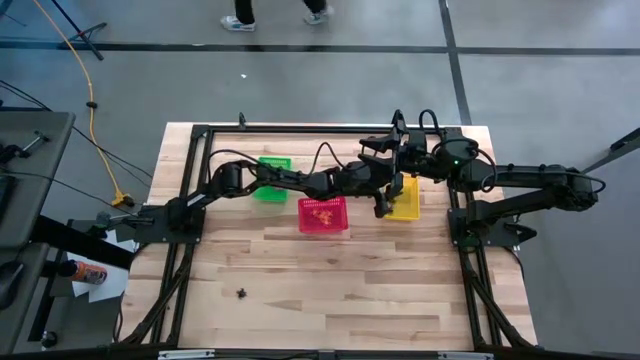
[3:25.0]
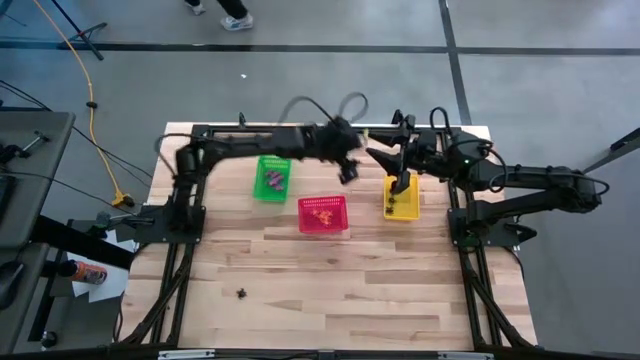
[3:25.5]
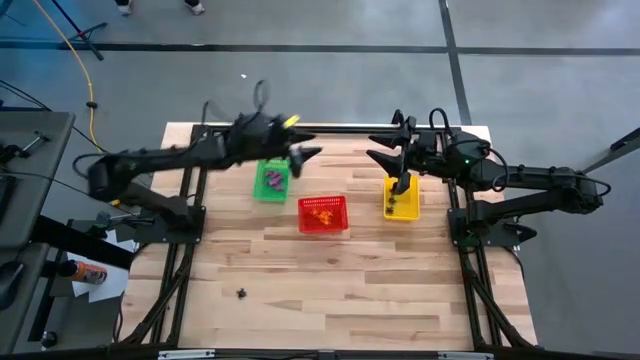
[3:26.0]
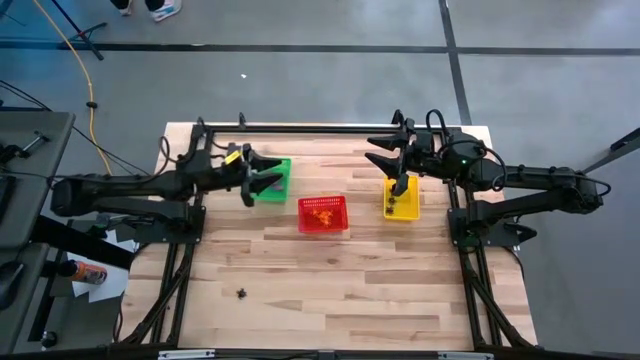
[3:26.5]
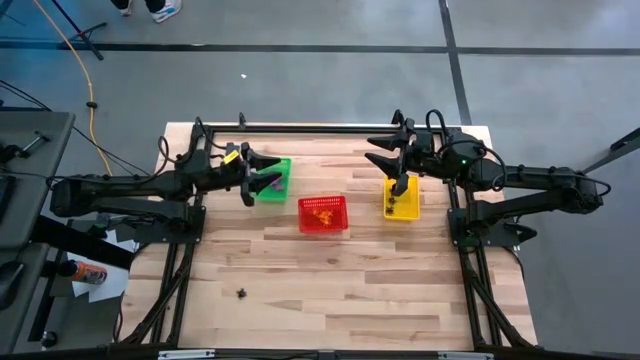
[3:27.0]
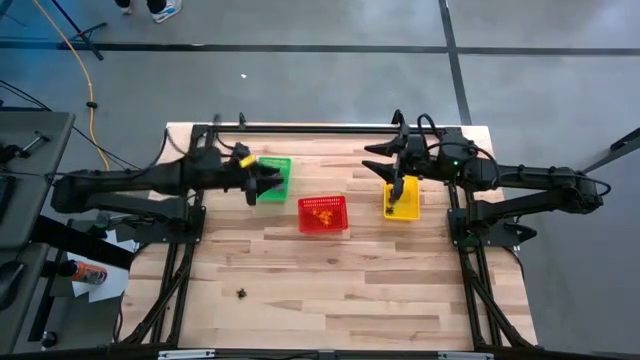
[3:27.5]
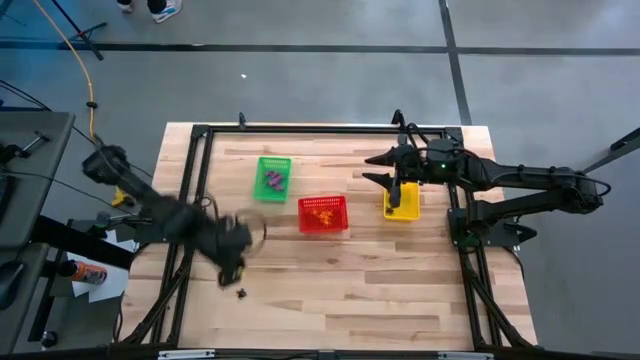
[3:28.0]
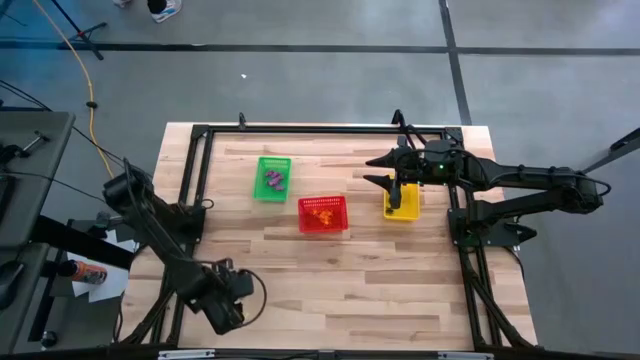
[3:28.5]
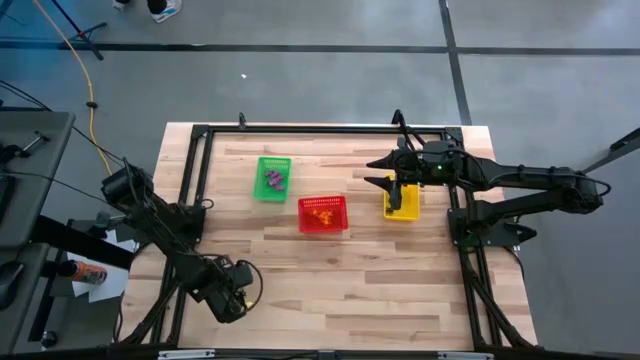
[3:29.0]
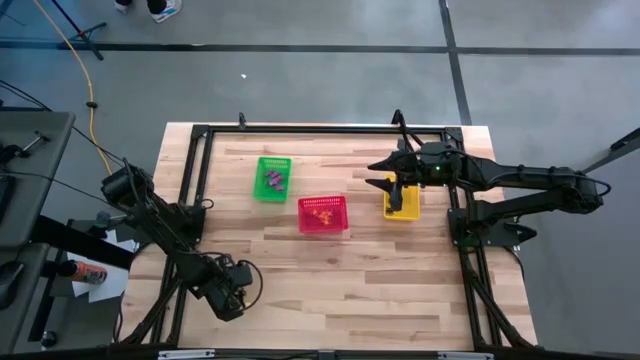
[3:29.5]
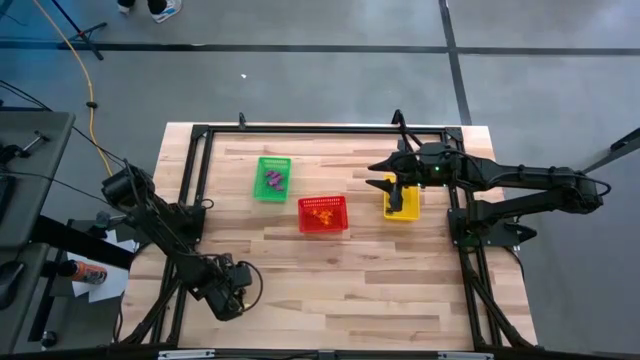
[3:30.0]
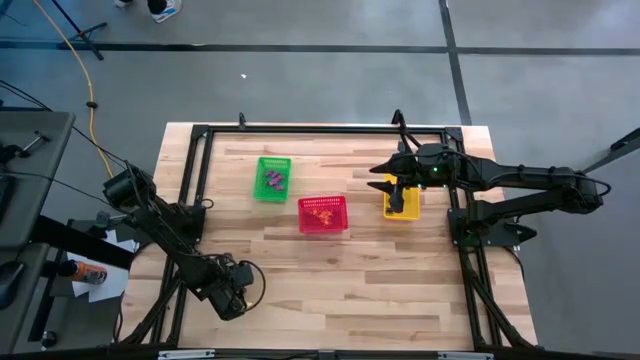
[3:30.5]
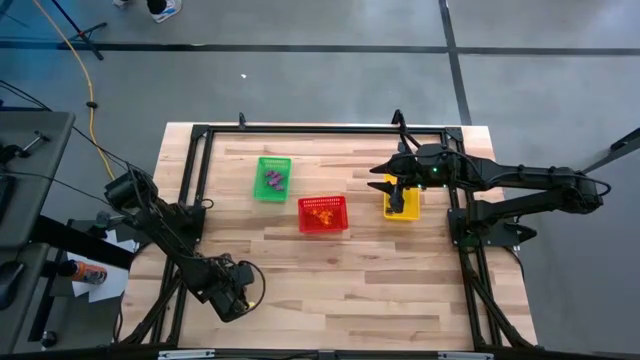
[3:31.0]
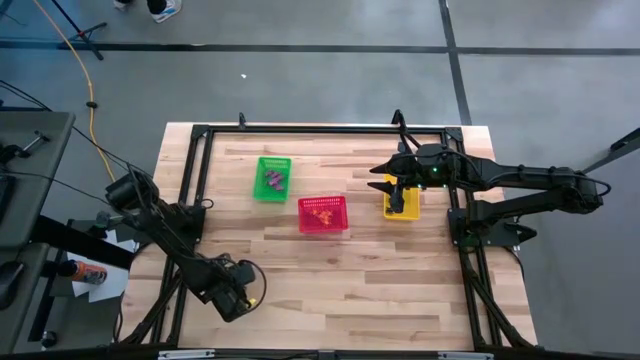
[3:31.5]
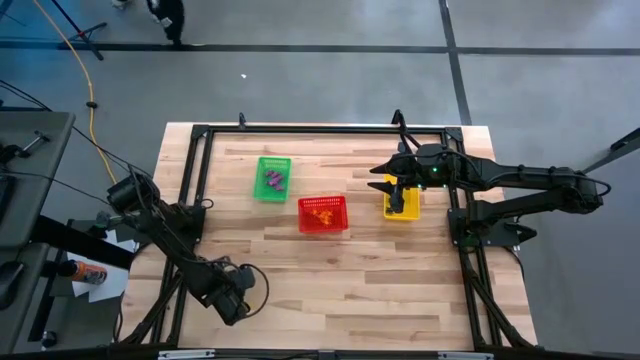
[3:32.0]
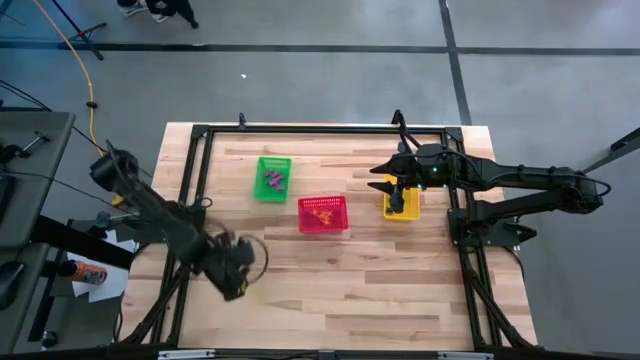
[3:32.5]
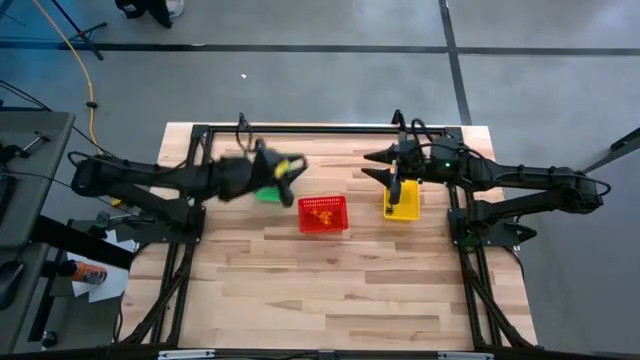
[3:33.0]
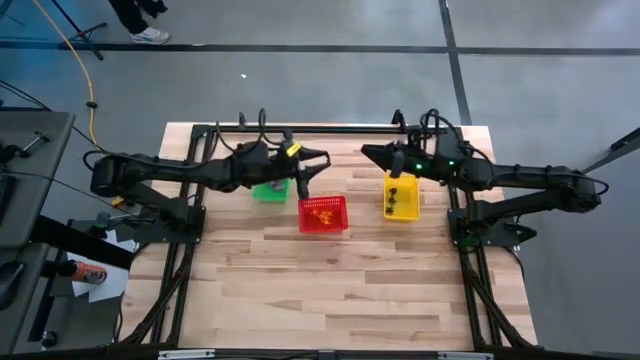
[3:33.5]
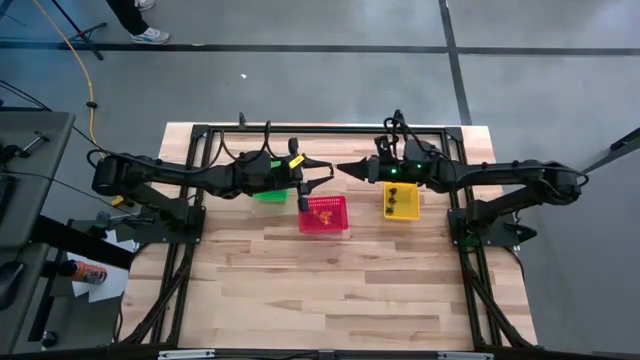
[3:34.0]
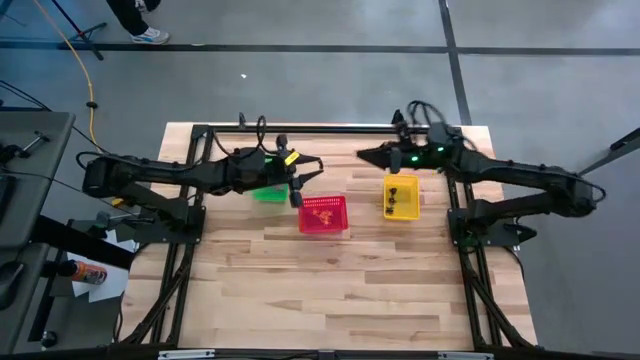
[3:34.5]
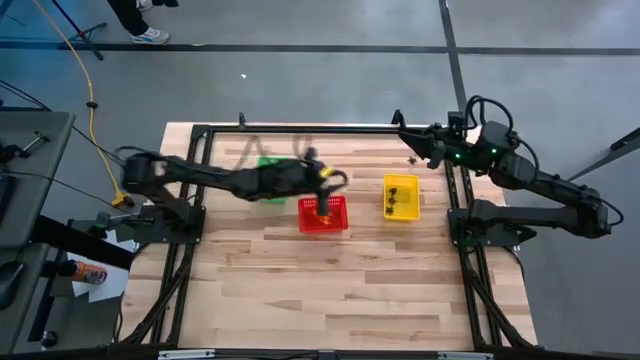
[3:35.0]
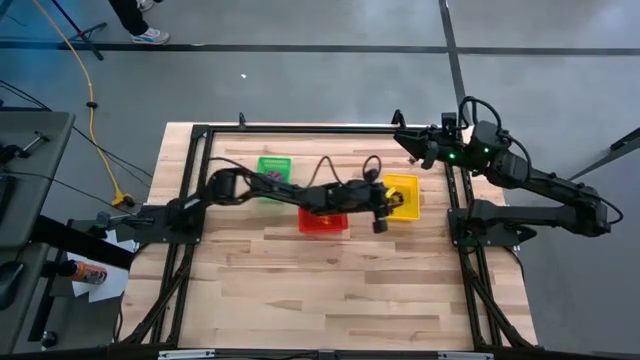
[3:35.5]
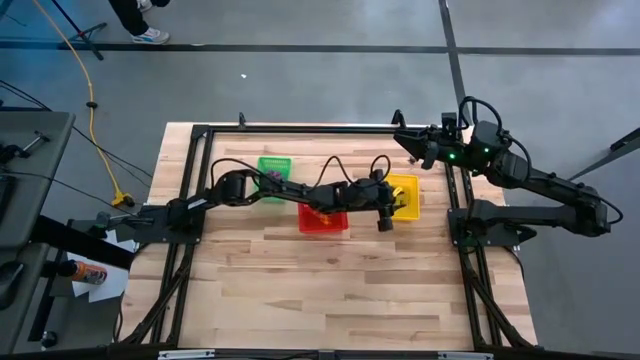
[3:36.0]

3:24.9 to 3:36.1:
Task: Sort Halloween decoration
Put the black spider toy into the yellow bin

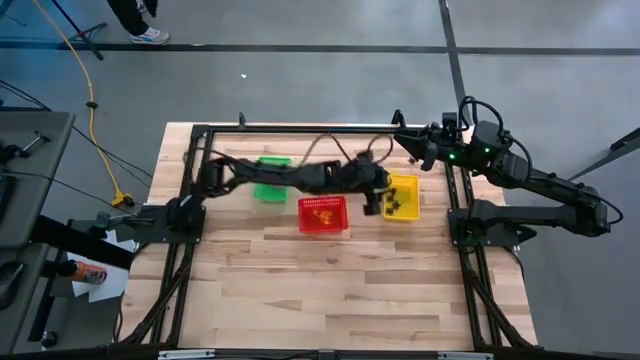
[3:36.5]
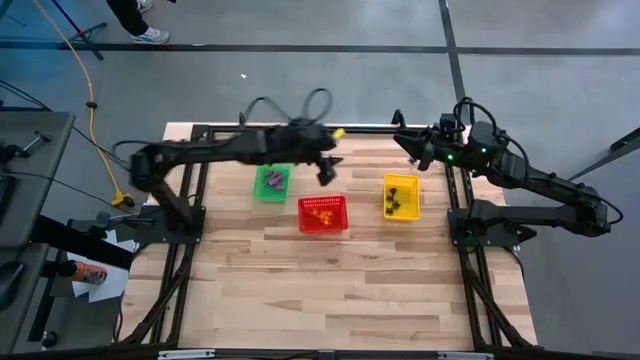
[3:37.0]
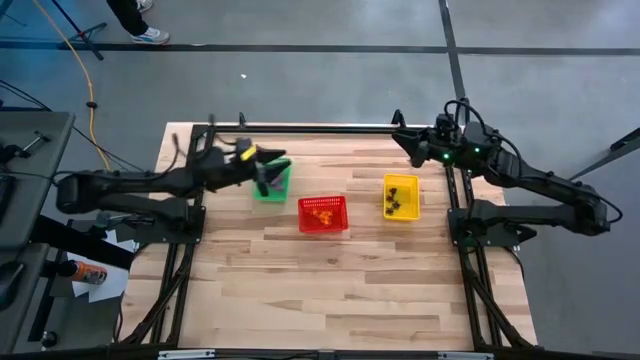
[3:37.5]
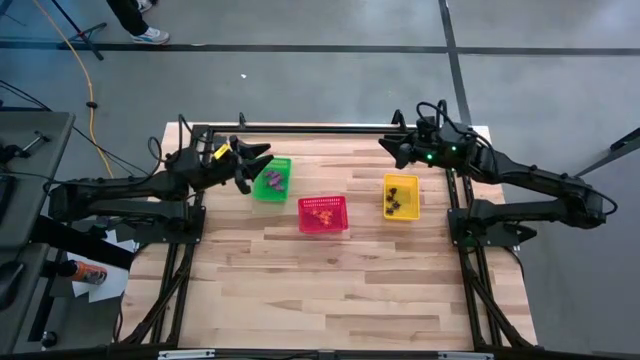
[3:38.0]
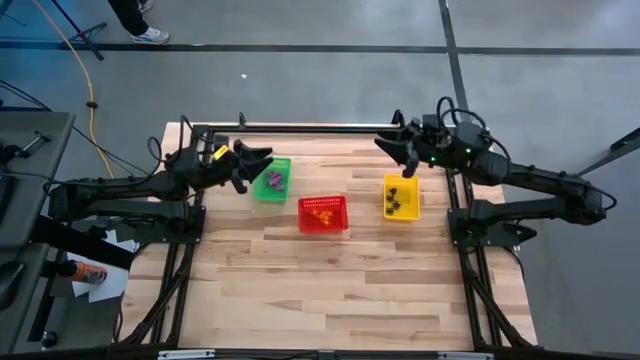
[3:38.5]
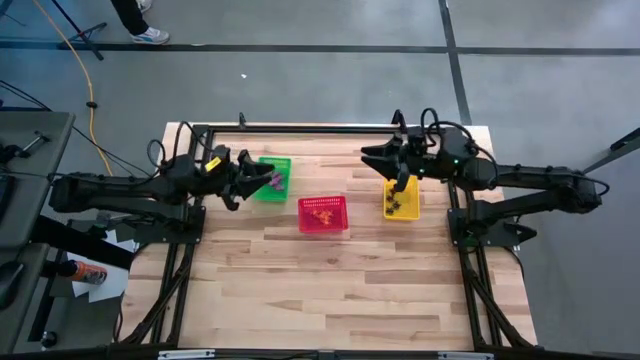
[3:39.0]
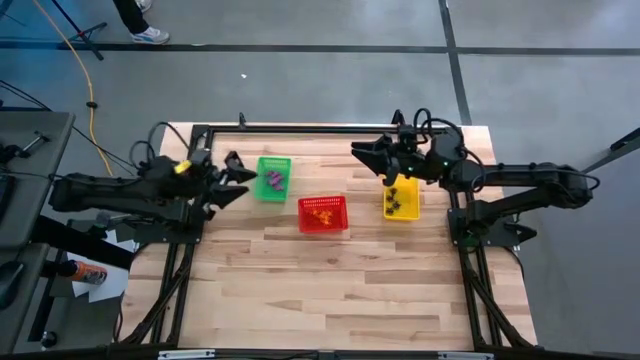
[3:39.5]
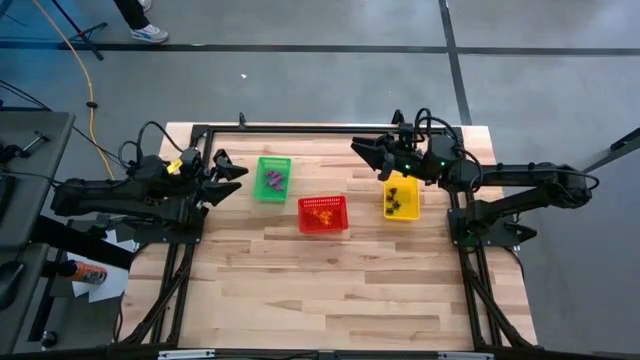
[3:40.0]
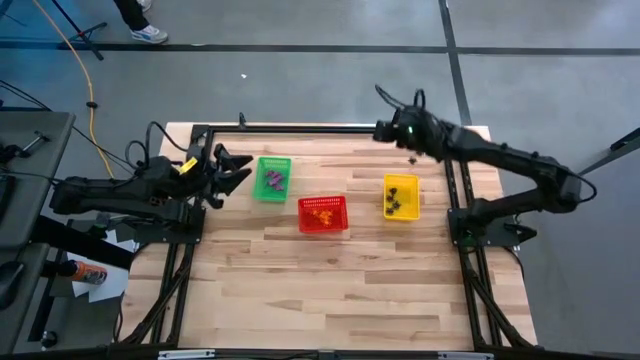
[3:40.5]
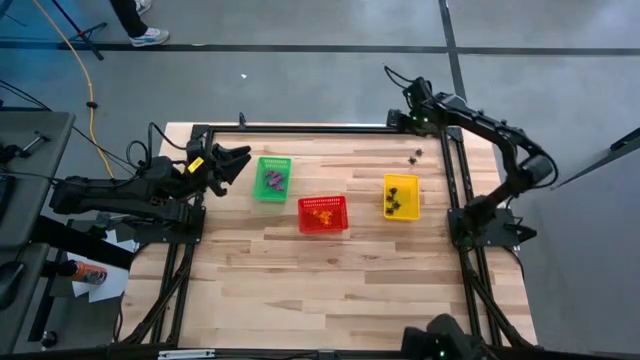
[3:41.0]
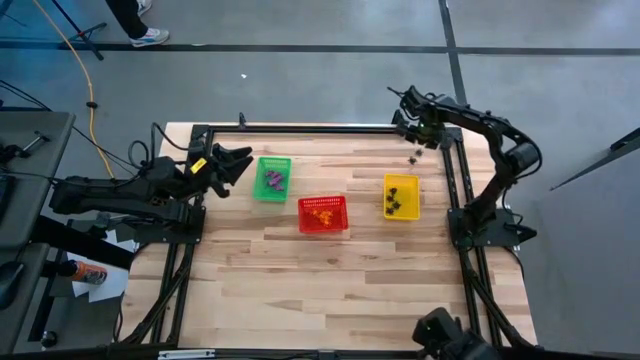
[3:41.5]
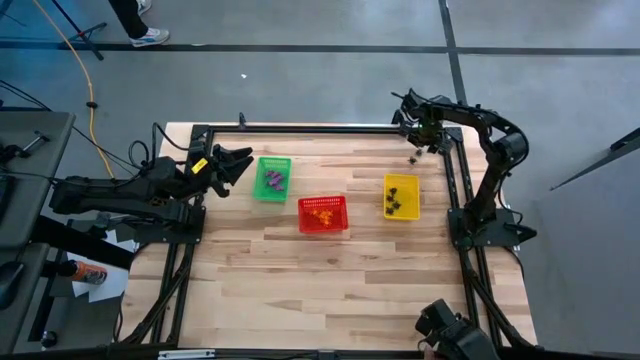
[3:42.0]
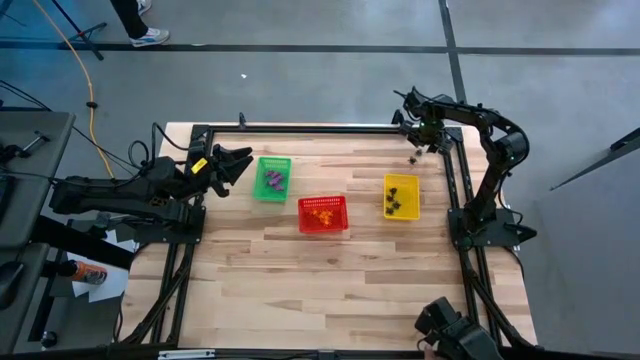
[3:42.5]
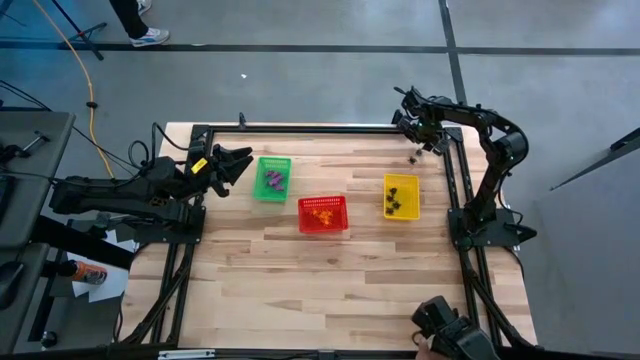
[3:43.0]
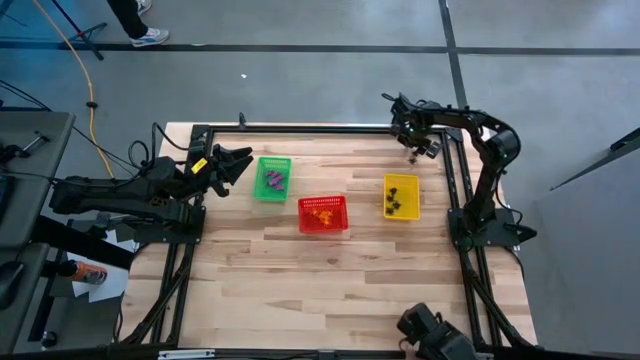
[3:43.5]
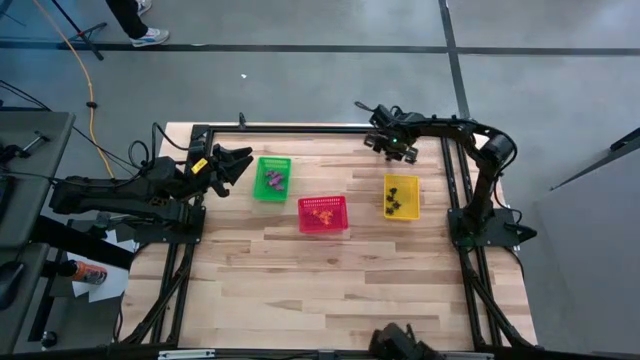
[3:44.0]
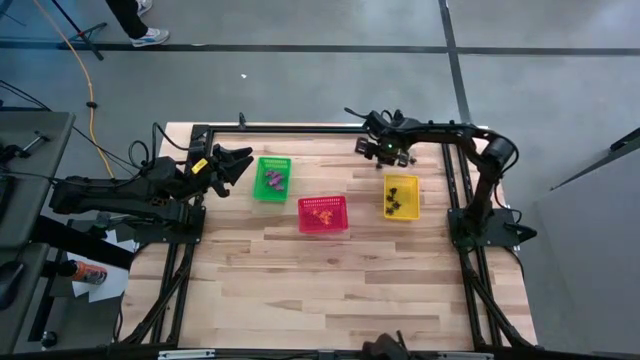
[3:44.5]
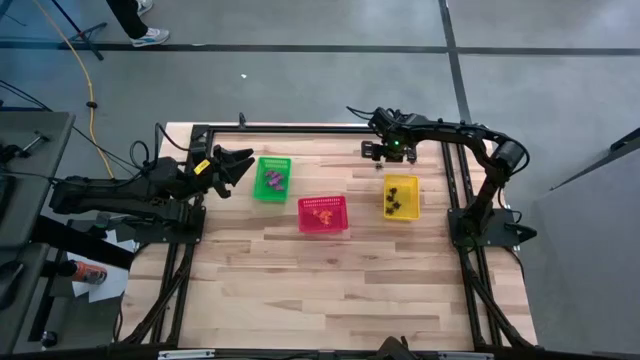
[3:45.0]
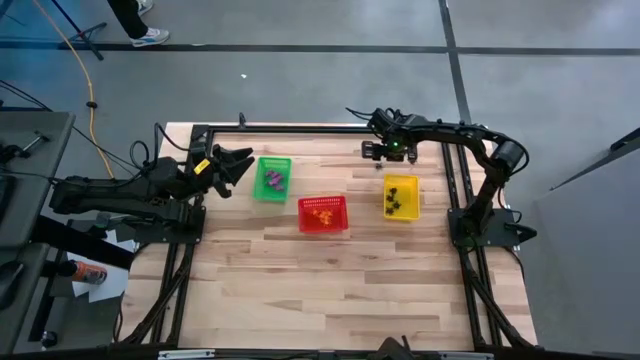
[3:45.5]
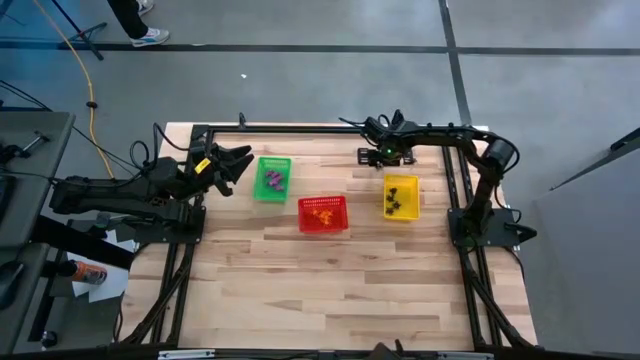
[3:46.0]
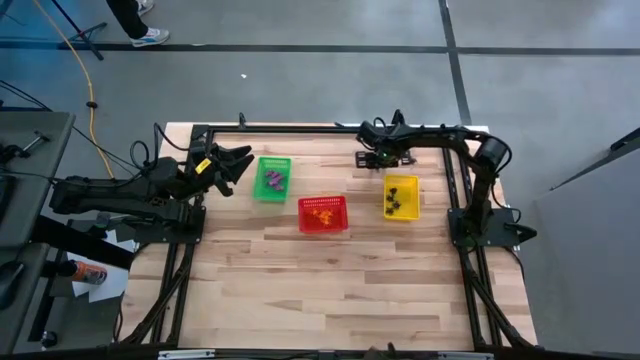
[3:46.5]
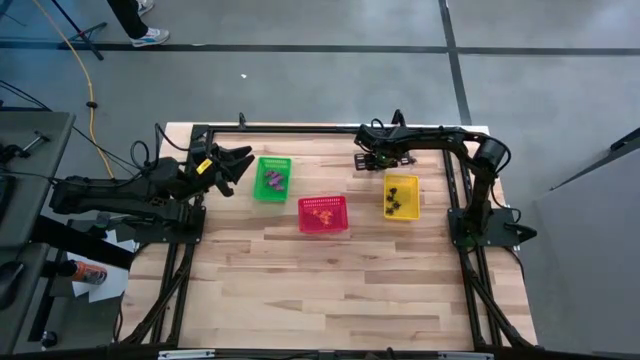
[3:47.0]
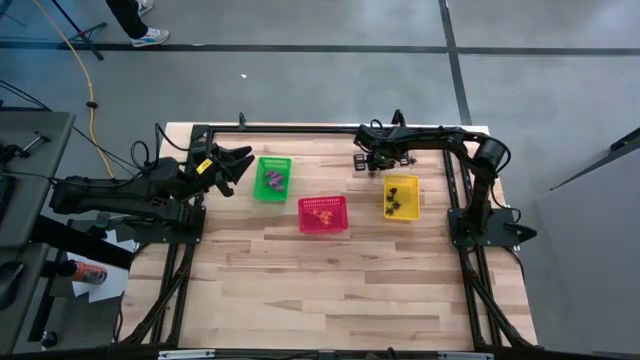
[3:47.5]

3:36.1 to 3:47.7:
Put the black spider toy into the yellow bin
